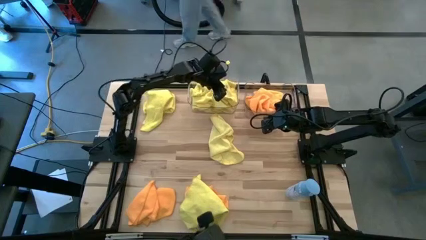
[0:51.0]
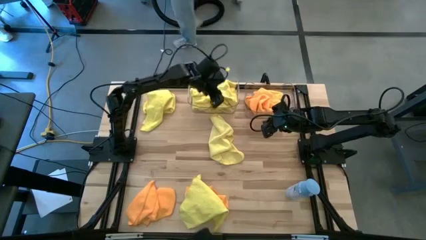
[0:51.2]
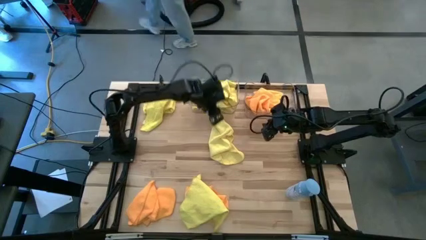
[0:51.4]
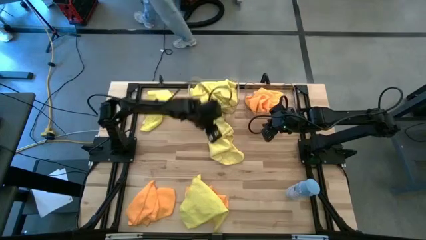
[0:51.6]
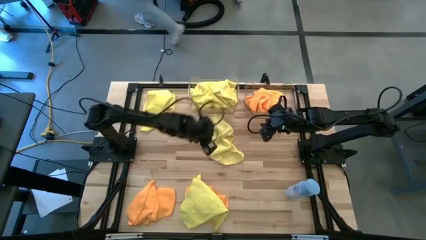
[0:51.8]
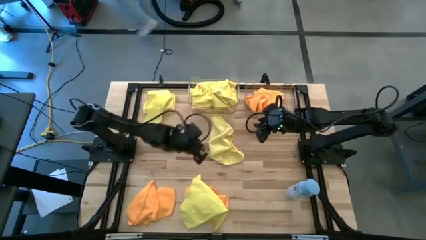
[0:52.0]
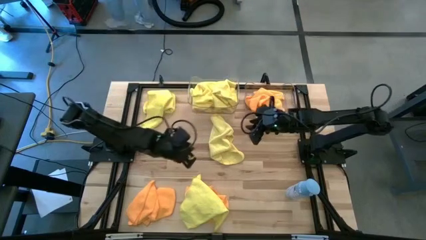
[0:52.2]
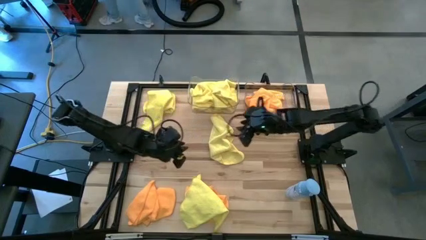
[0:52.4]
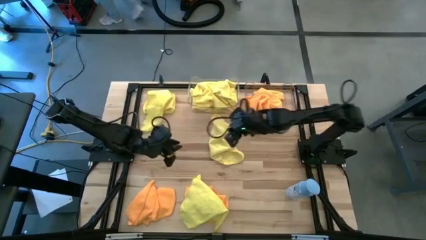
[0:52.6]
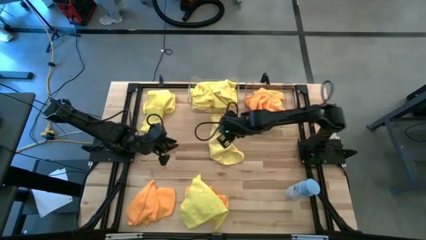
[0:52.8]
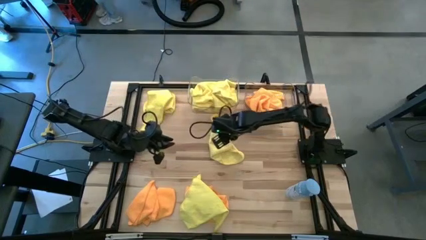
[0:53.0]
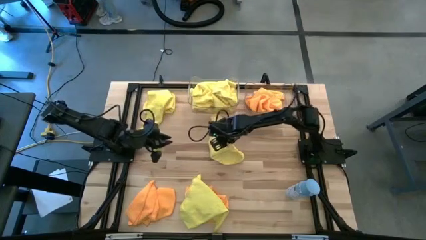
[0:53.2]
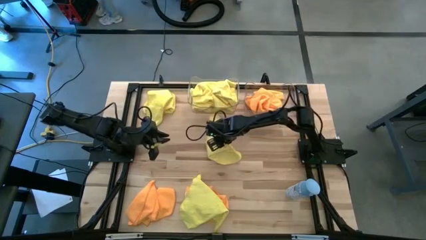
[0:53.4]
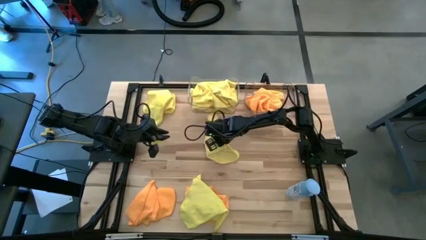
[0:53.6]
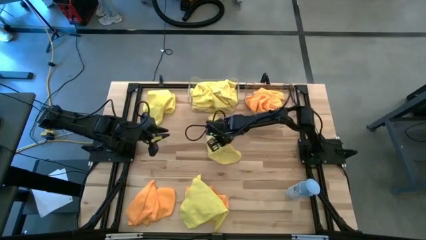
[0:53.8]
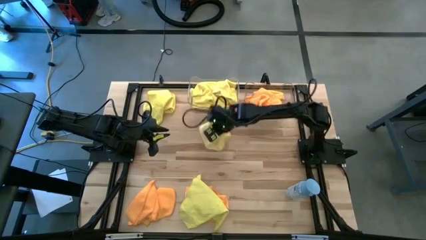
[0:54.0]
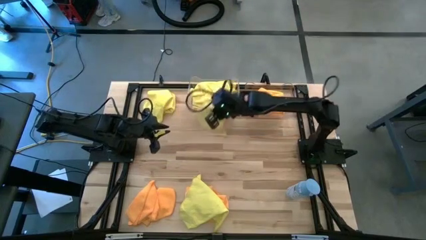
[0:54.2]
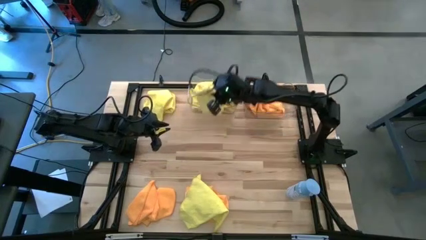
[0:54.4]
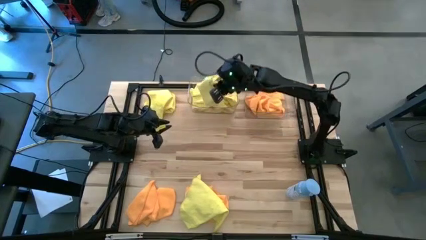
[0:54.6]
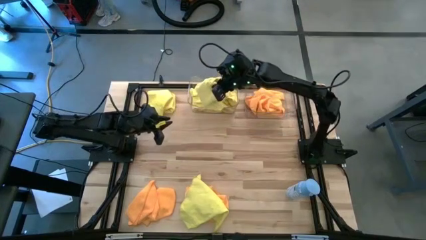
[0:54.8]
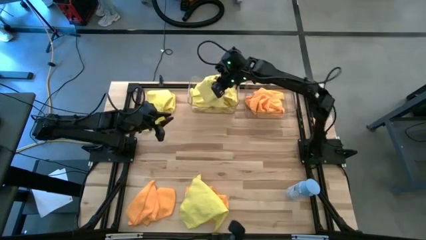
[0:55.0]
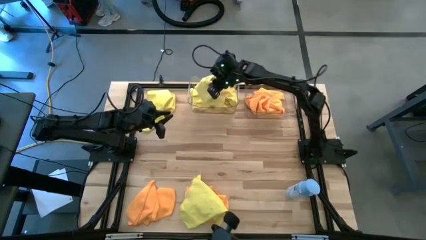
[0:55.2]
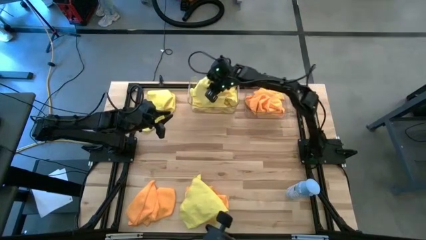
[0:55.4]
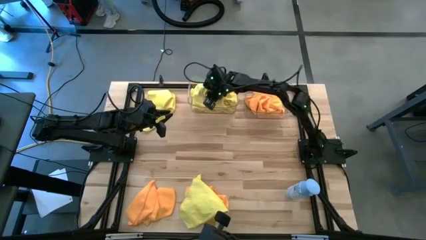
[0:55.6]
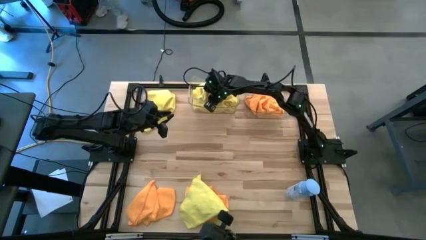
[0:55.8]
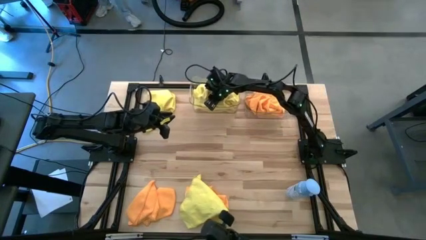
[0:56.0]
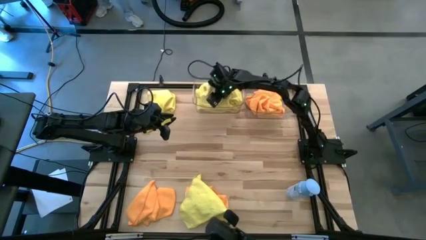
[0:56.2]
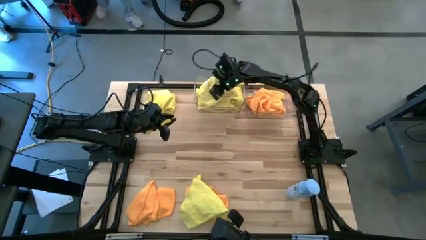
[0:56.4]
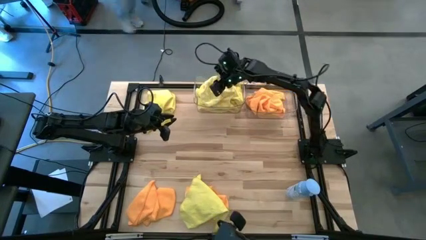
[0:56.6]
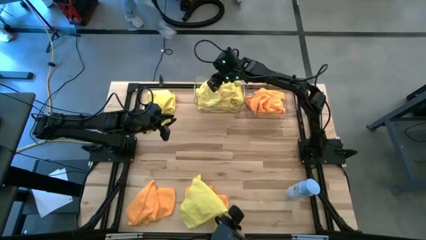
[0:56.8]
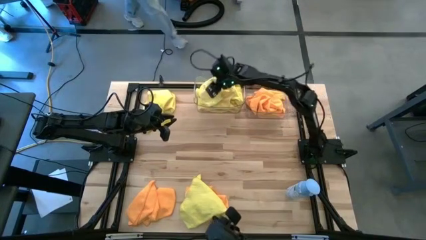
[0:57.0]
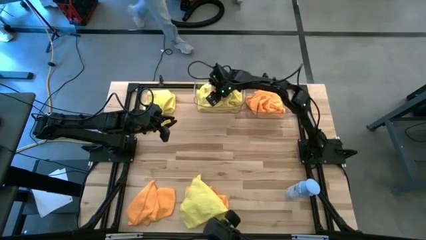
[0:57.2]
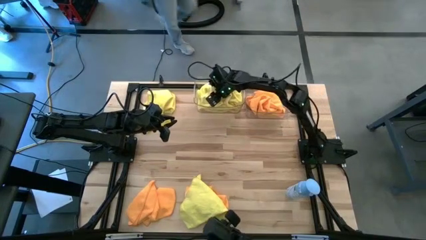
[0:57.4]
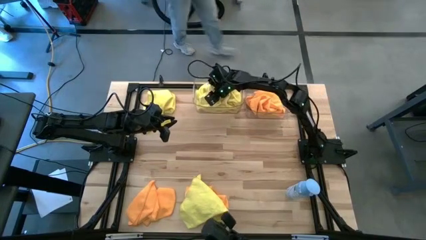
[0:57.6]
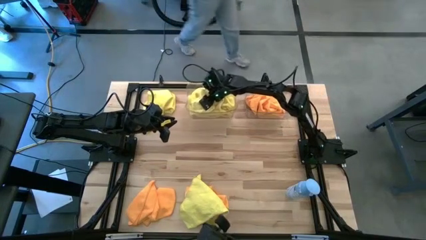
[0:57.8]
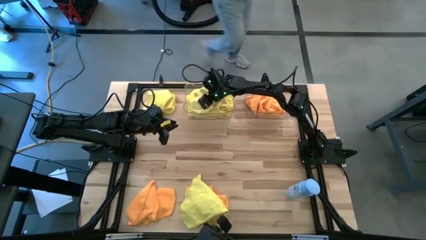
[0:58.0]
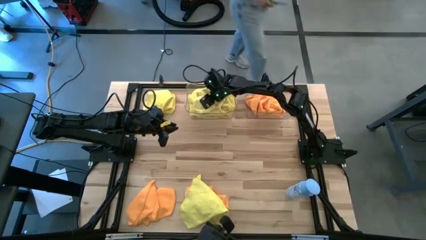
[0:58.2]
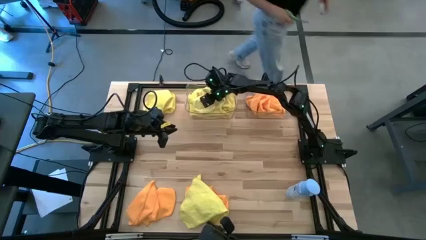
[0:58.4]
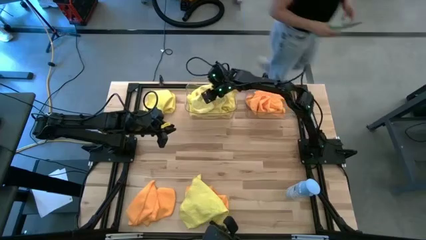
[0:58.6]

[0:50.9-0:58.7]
Task: Sort microfiber towel by color & place in baskets
Put the yellow microfiber cloth into the left transparent bin

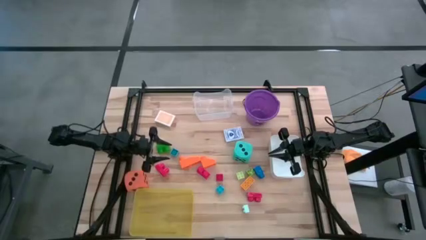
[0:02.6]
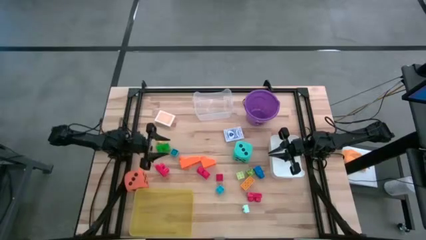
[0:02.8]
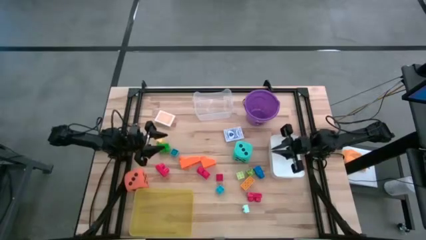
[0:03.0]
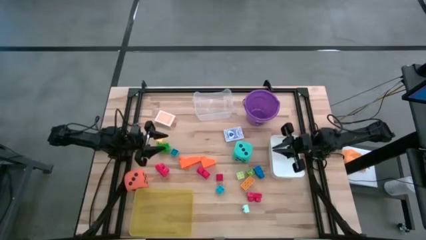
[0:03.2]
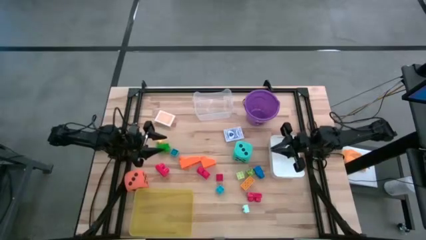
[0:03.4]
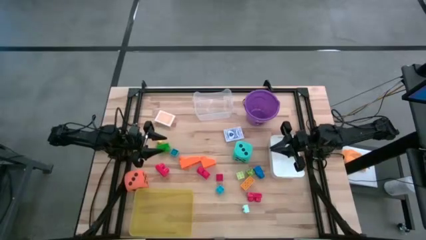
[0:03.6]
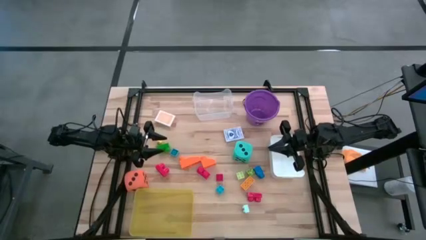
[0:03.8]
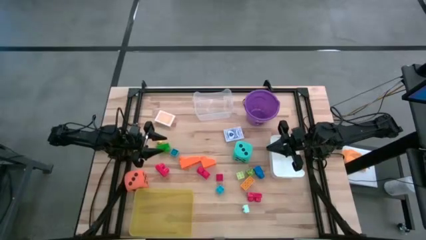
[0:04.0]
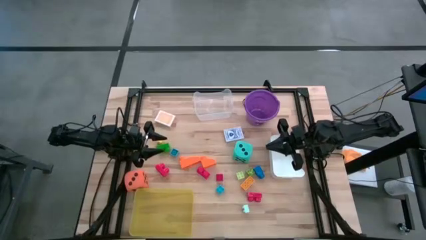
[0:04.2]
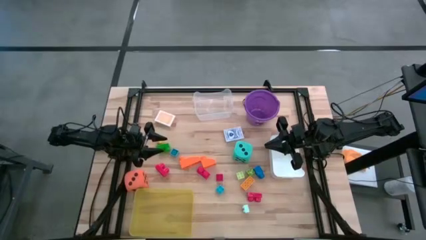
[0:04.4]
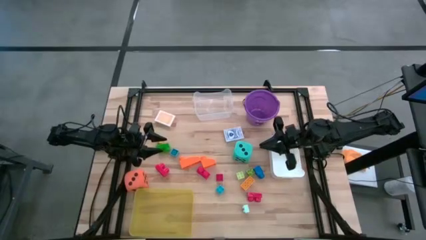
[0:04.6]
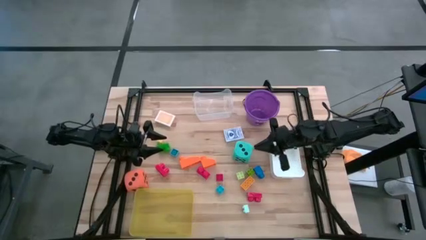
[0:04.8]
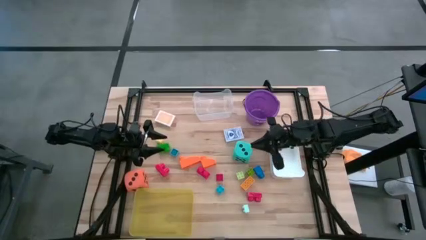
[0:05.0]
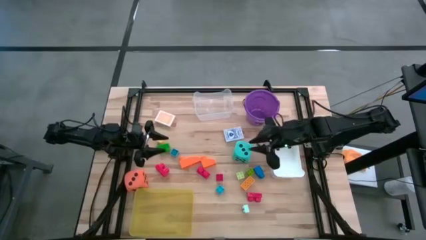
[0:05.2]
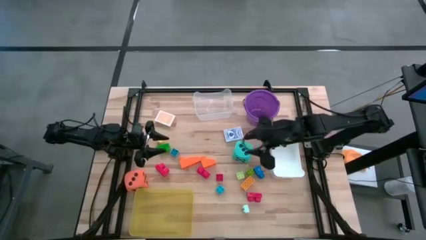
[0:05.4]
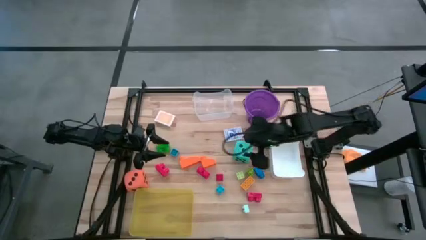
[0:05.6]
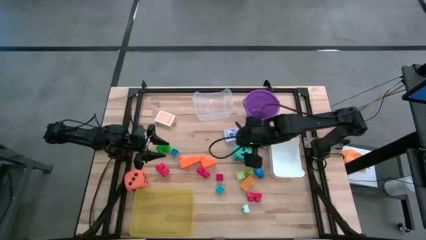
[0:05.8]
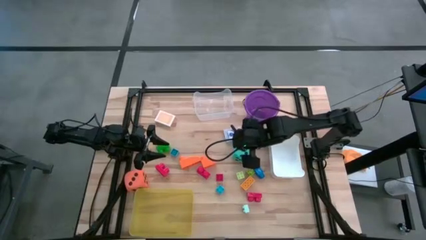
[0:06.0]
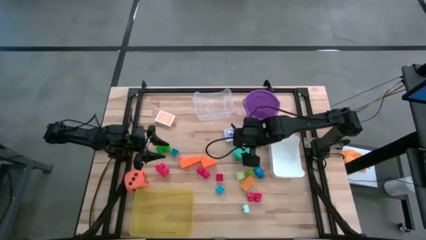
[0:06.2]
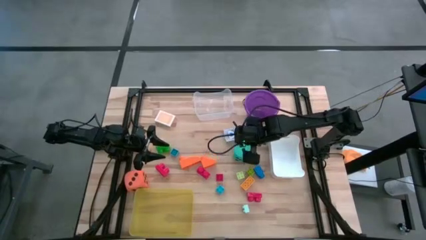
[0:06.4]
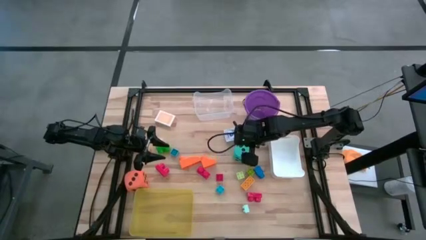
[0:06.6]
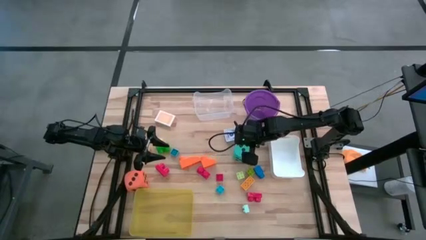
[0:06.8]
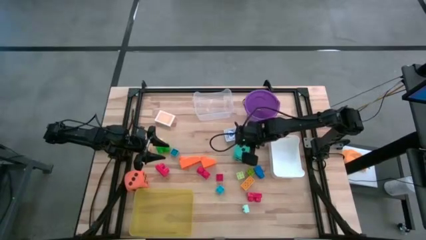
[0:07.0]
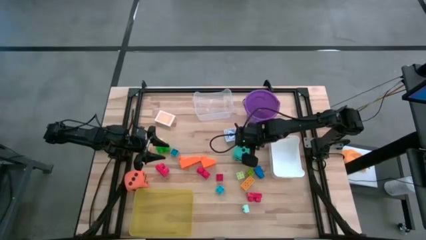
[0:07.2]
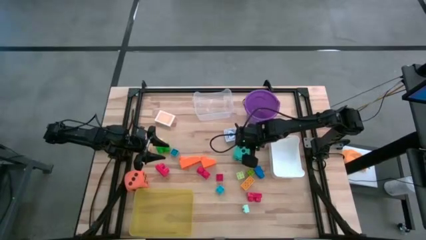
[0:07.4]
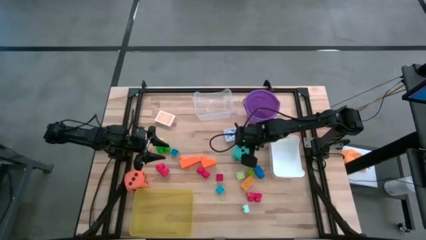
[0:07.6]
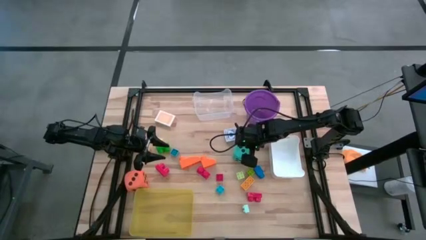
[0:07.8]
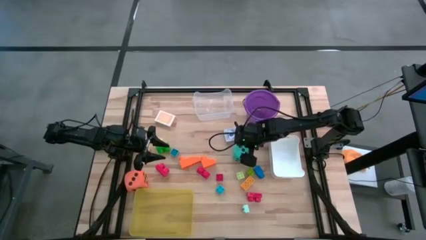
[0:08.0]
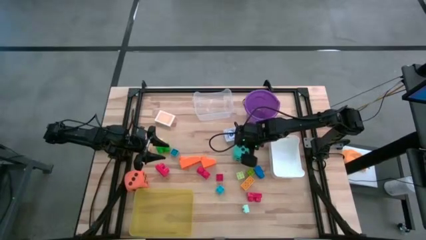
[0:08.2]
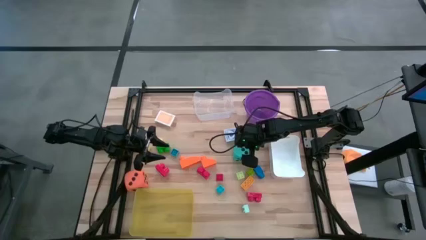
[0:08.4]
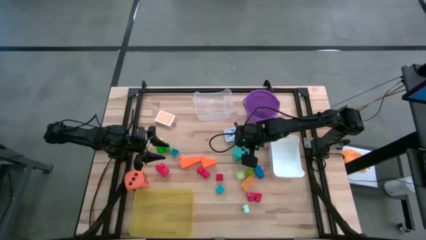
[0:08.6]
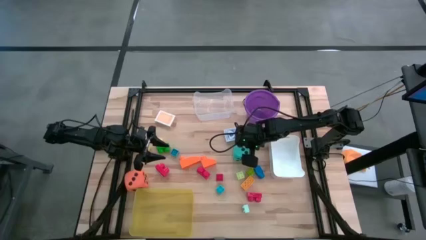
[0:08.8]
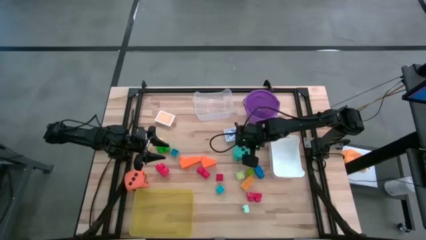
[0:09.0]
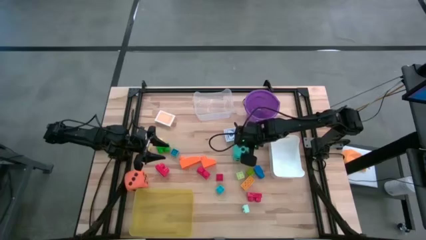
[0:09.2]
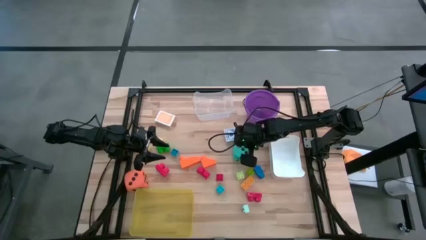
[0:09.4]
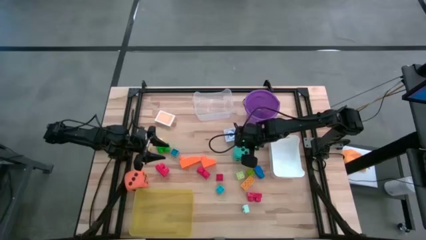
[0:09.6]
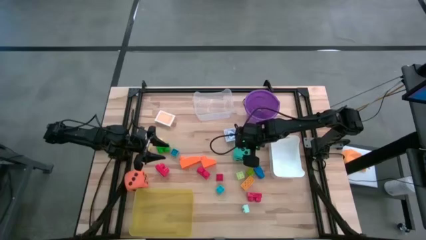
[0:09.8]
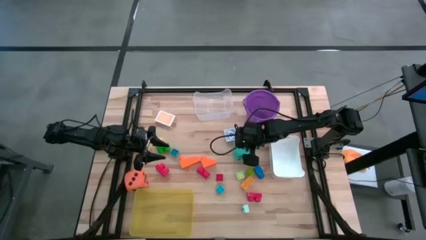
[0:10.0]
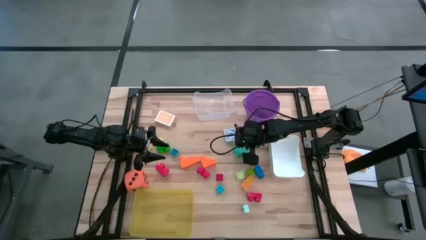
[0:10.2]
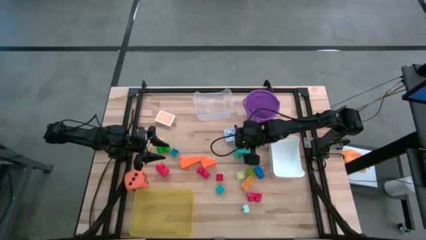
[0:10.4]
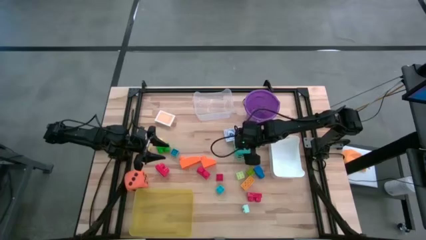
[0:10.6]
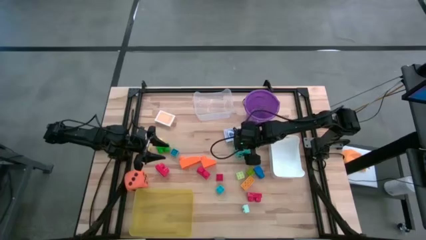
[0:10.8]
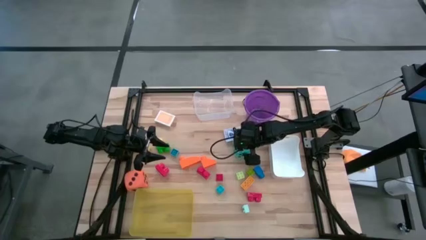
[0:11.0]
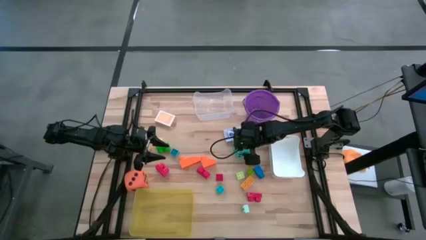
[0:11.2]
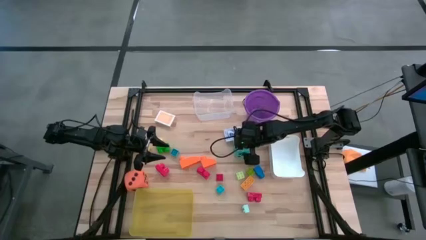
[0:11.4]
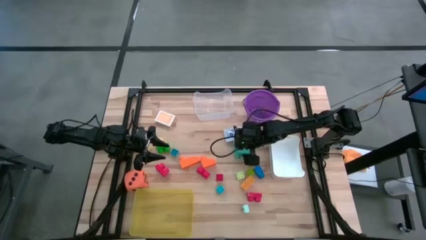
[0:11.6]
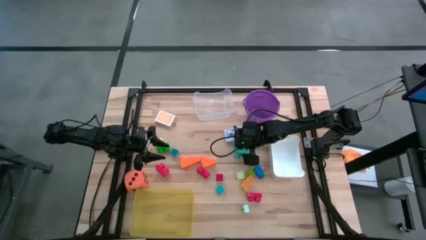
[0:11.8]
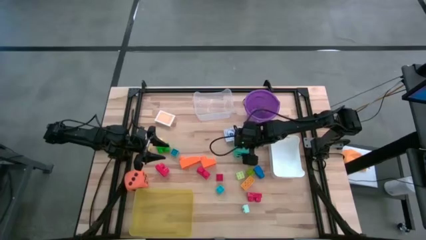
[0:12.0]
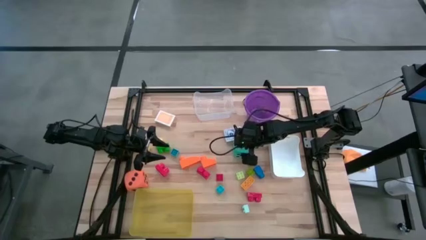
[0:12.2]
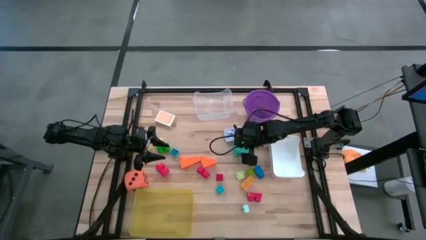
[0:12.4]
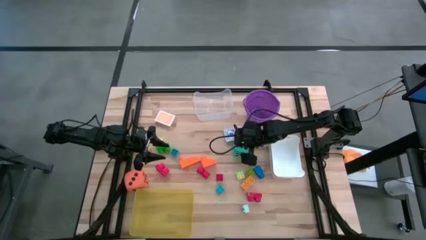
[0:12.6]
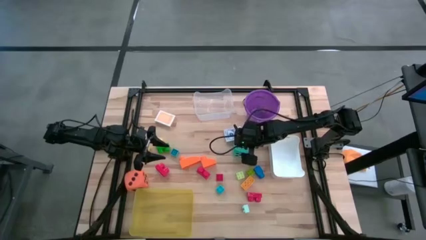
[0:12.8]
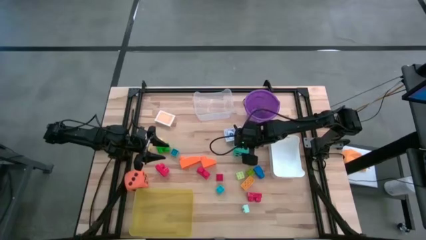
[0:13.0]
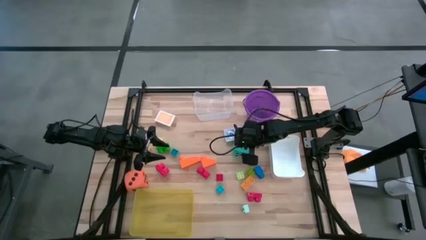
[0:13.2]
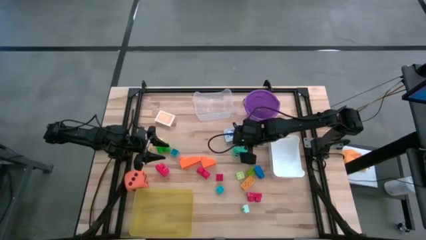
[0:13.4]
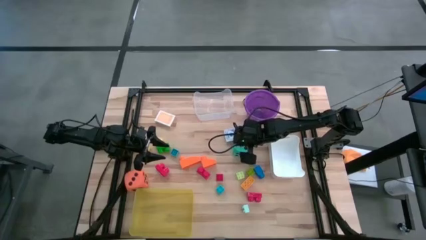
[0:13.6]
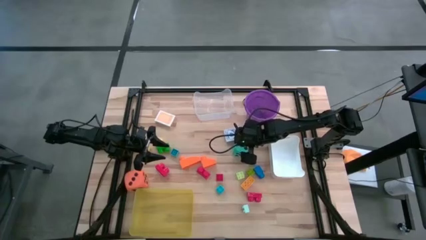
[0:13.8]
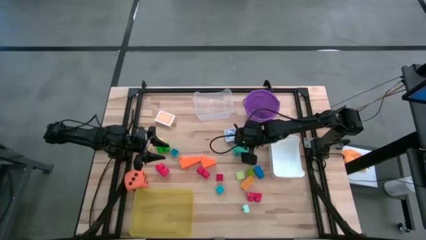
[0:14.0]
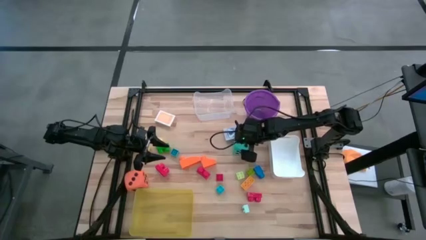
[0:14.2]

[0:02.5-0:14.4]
Task: Pick & Place Toys
Put the light blue dice into the white bin
